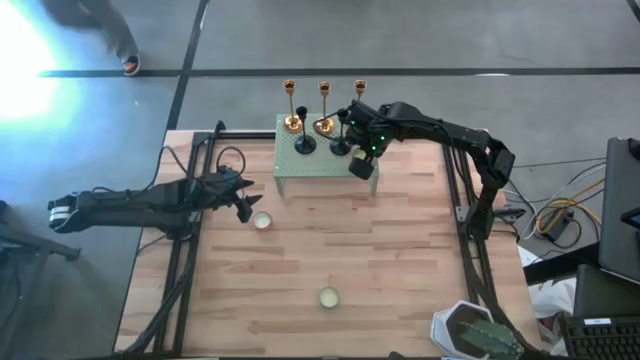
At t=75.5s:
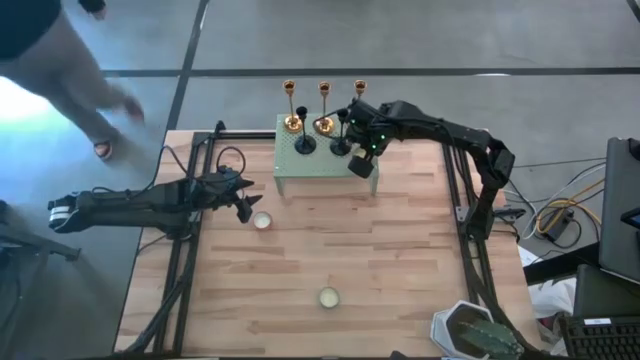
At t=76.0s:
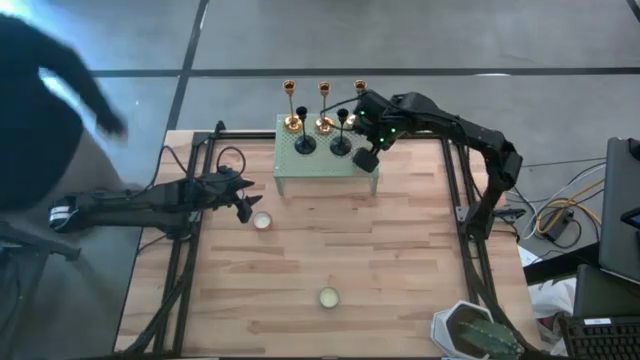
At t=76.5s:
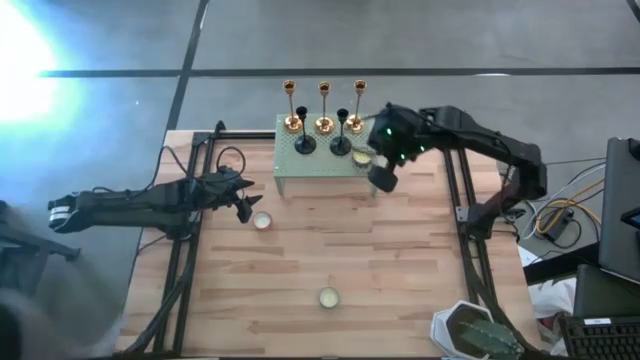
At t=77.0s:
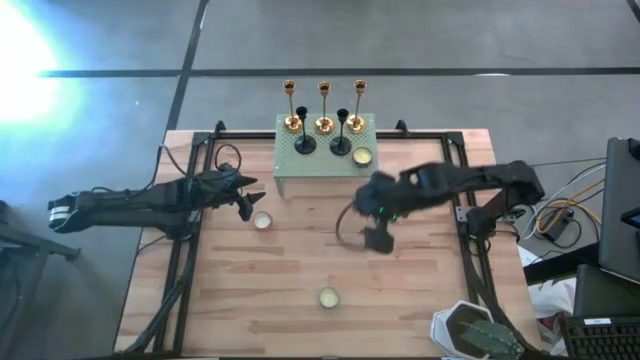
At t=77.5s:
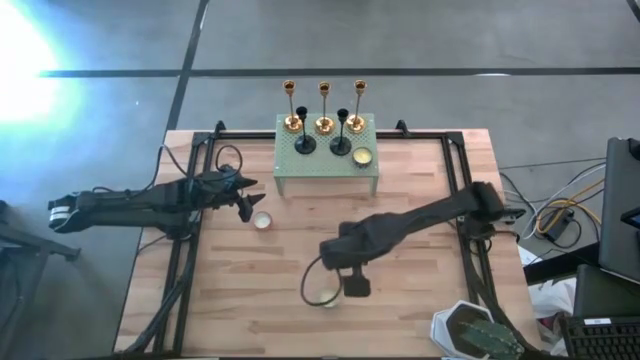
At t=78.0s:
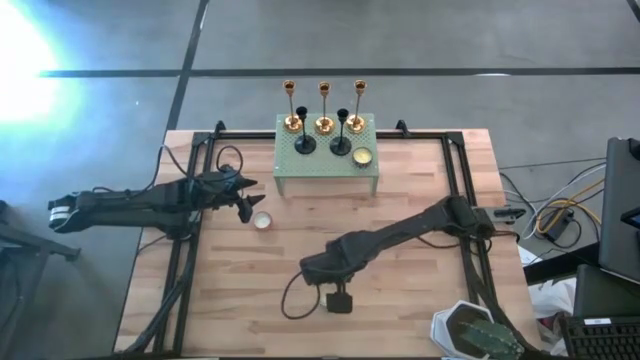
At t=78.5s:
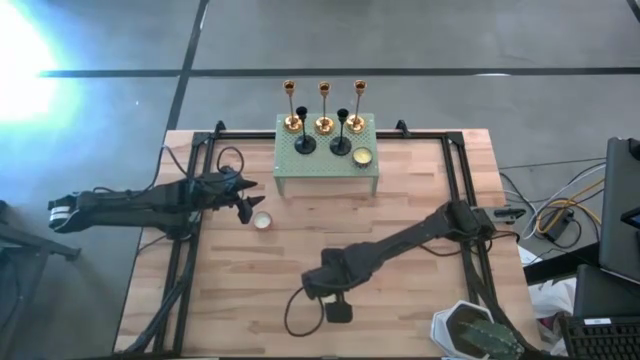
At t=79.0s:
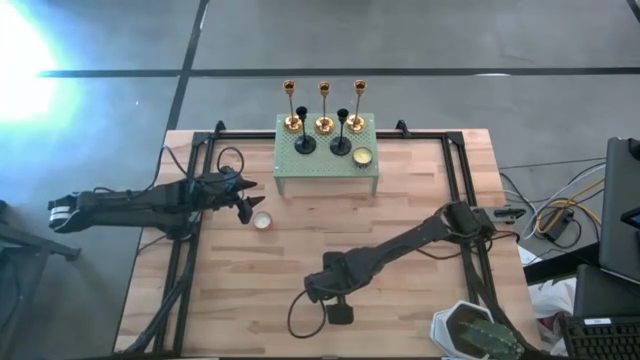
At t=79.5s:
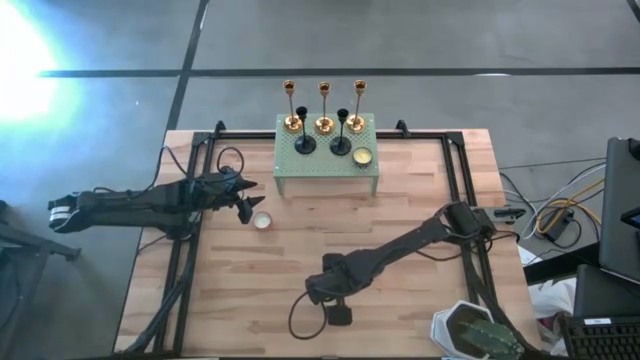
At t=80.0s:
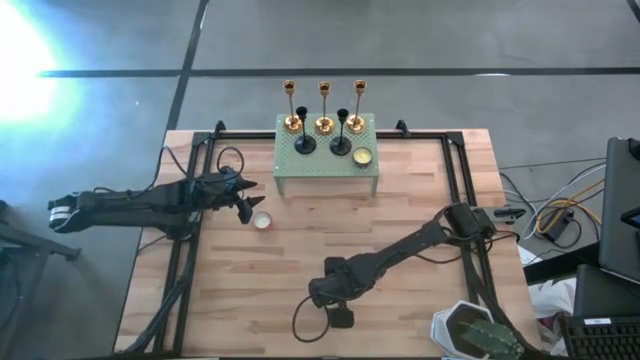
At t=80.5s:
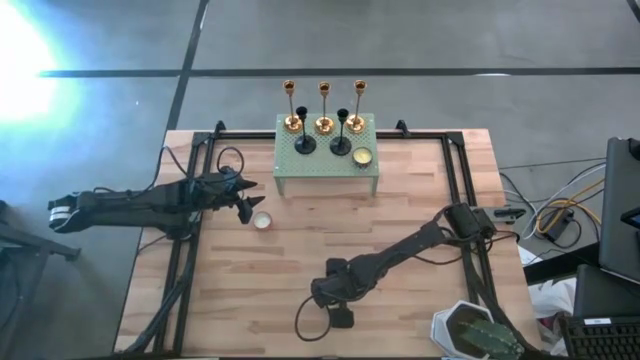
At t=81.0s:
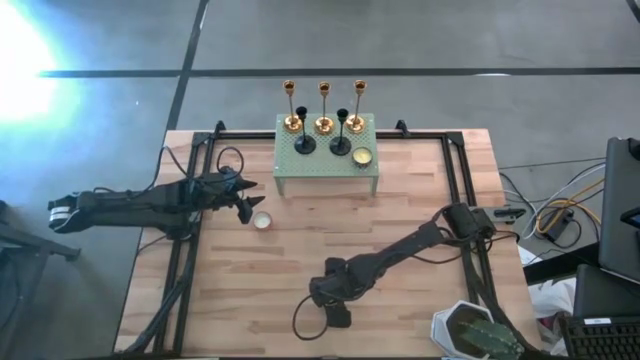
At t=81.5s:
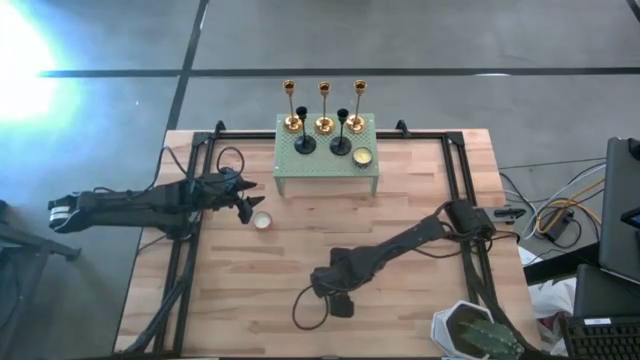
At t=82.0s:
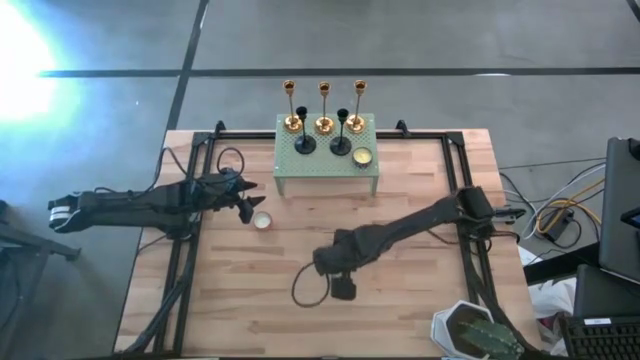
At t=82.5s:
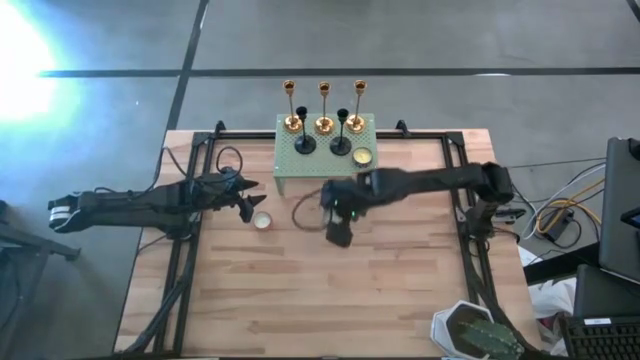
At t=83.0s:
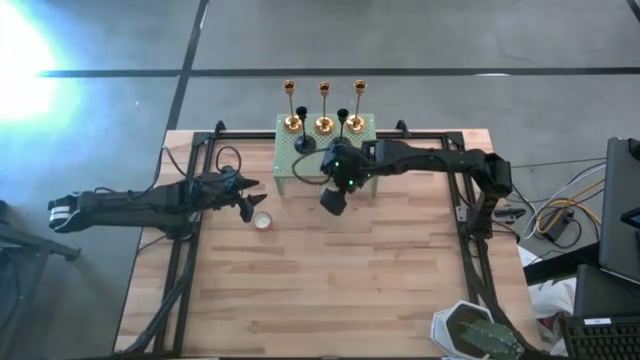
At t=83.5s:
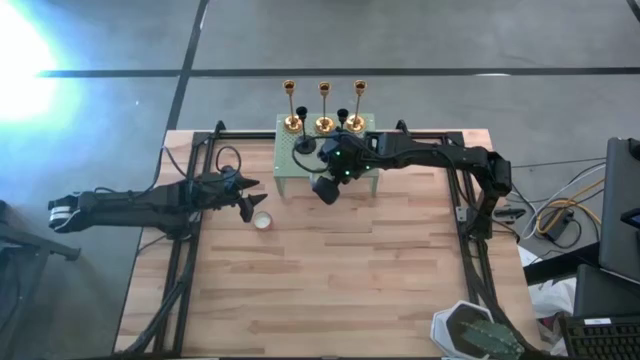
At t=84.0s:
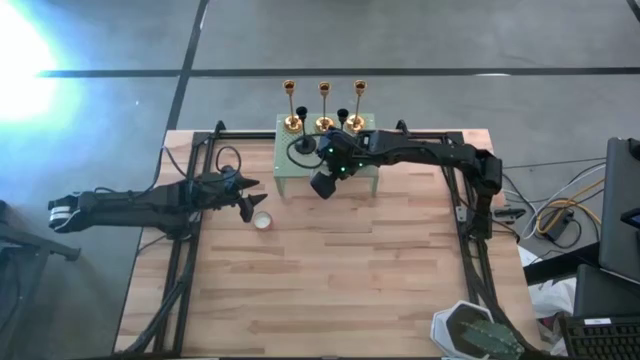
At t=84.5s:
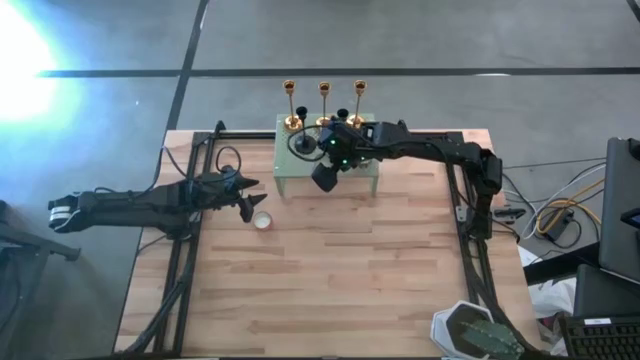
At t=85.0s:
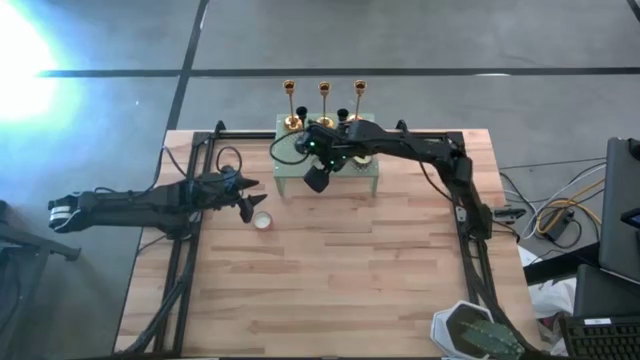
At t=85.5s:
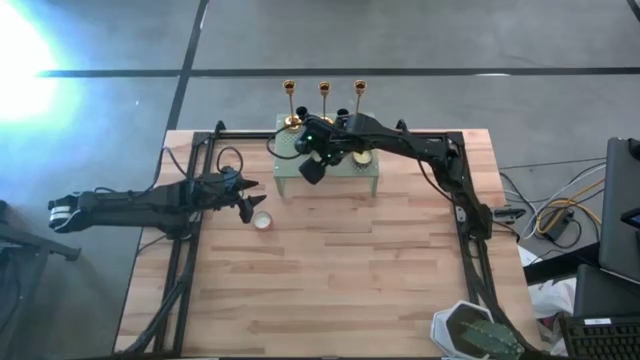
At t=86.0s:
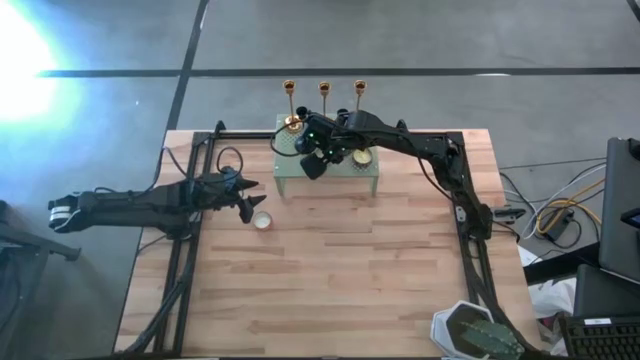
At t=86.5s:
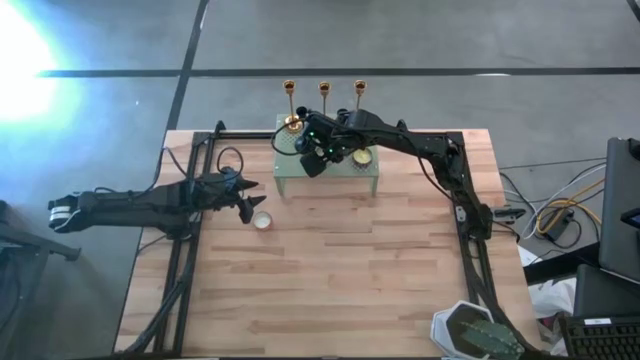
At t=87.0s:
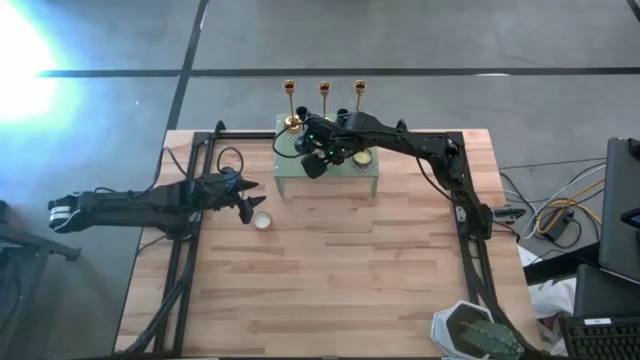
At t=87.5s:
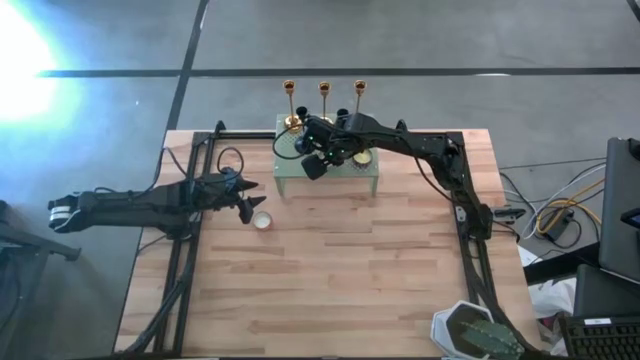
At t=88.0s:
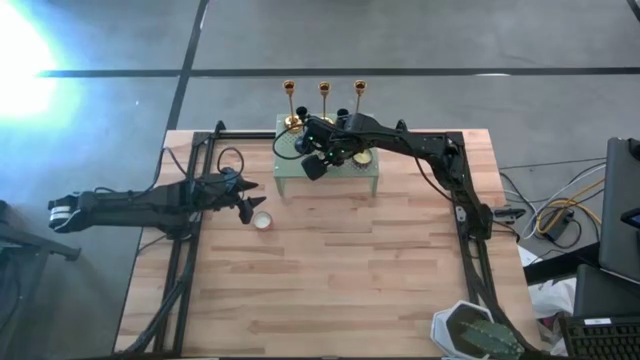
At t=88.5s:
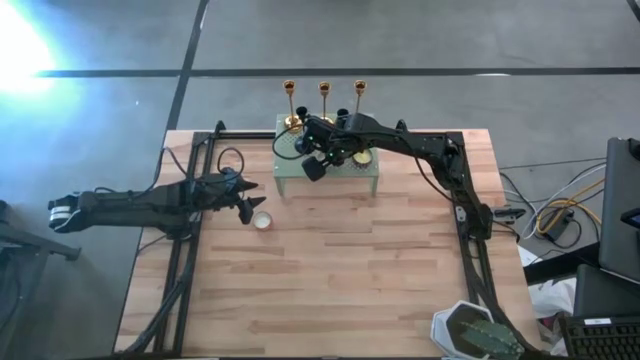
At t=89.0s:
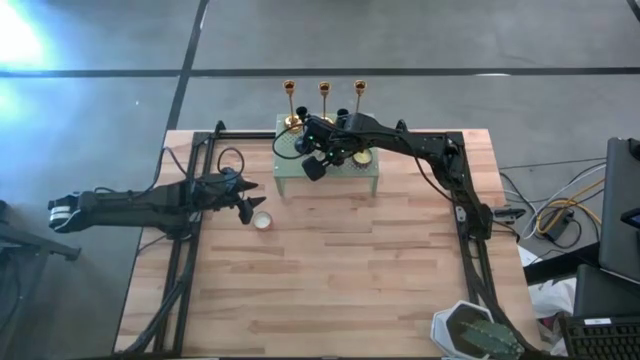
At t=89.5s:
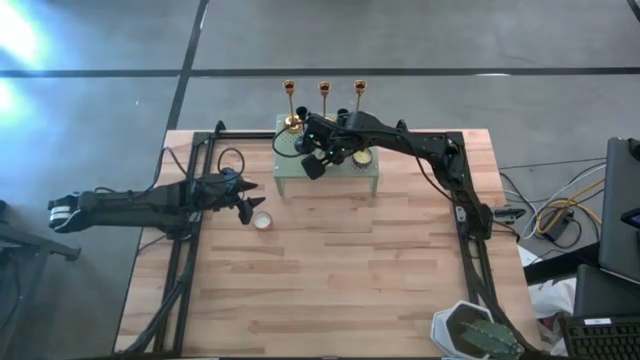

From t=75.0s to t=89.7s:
Task: Pick & Place candle stick holders
Put the white patterned scented candle on the shelf

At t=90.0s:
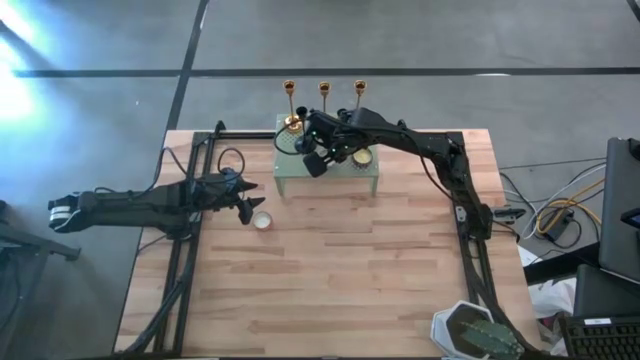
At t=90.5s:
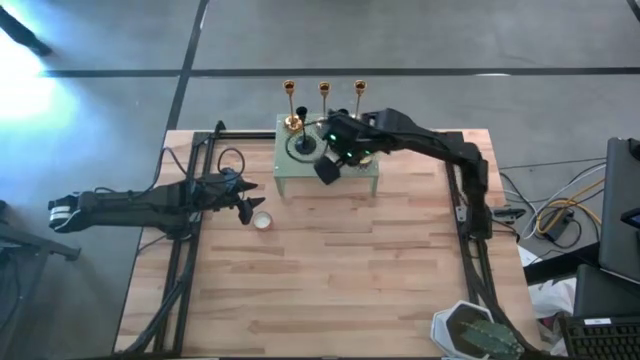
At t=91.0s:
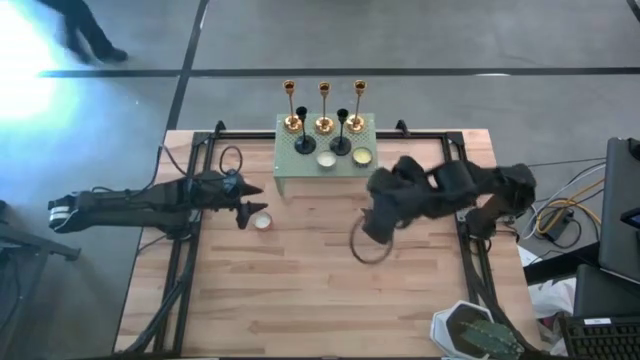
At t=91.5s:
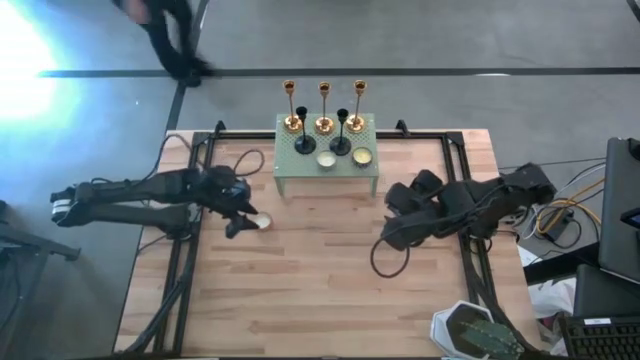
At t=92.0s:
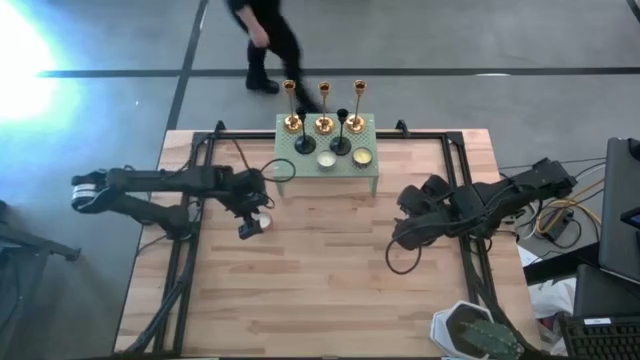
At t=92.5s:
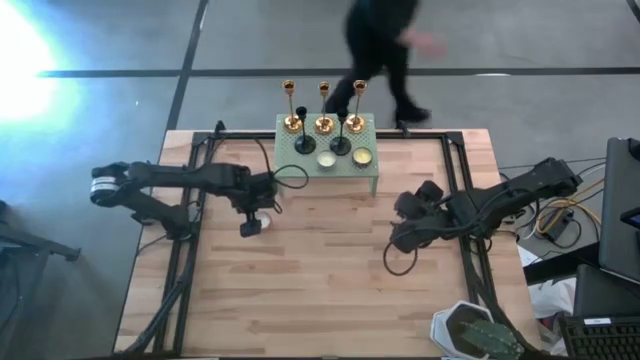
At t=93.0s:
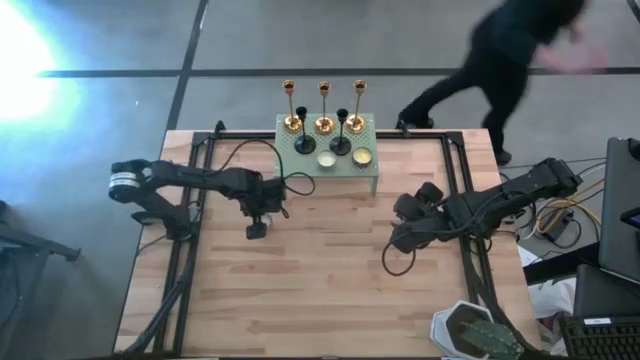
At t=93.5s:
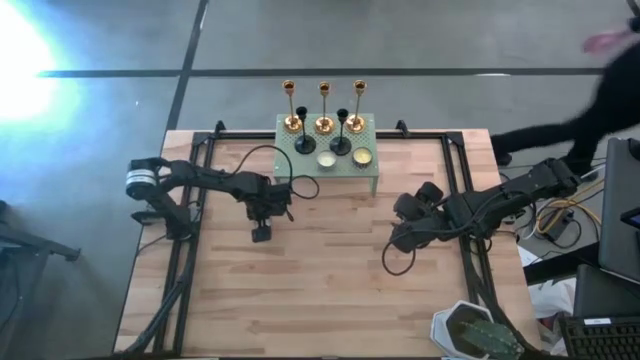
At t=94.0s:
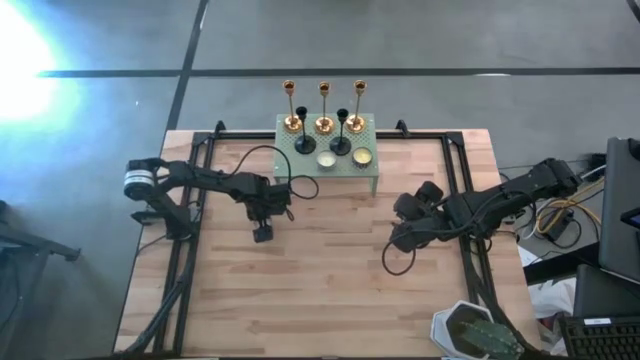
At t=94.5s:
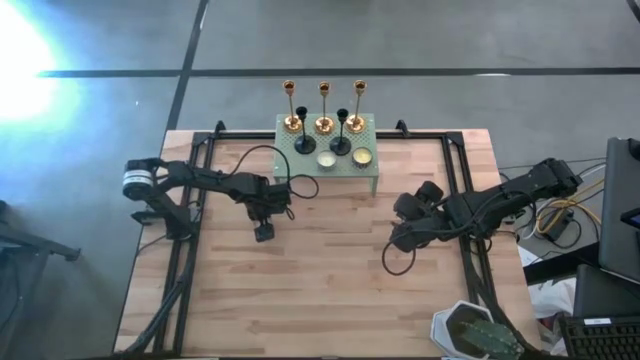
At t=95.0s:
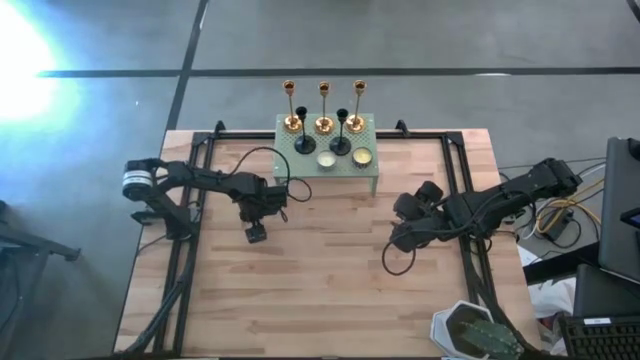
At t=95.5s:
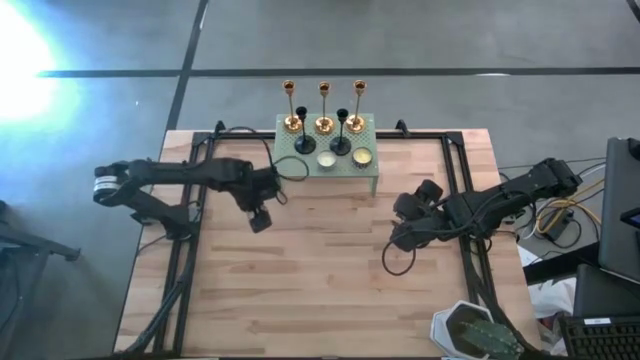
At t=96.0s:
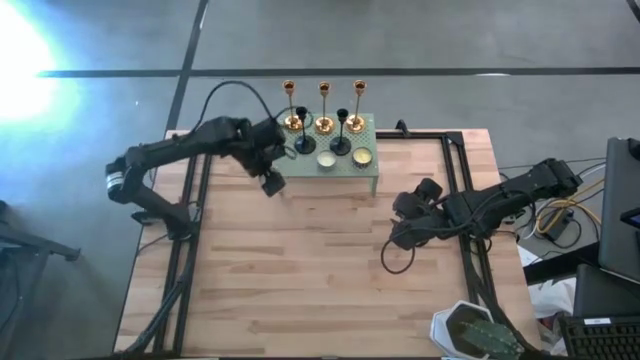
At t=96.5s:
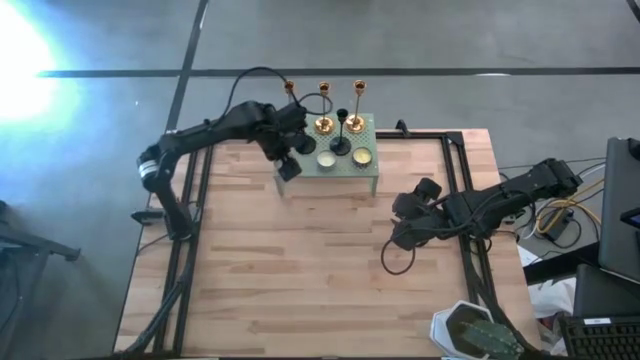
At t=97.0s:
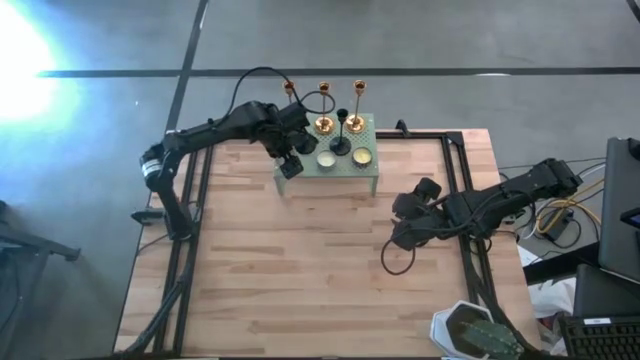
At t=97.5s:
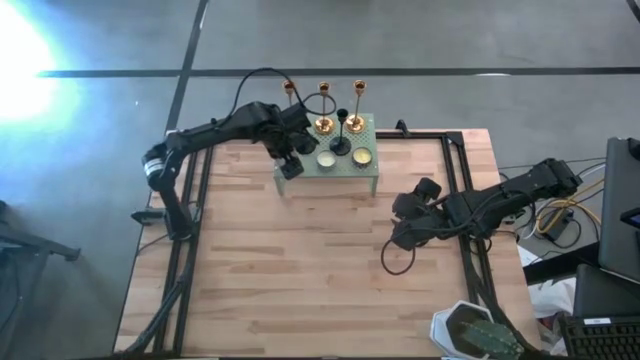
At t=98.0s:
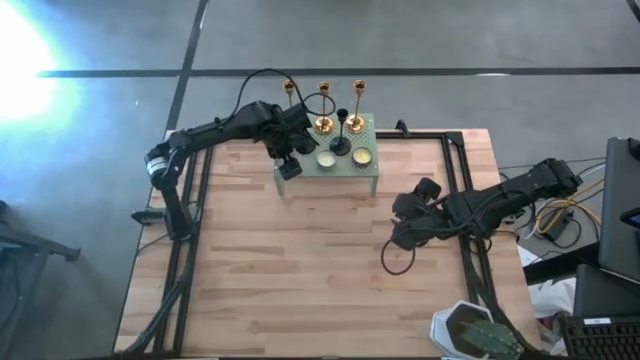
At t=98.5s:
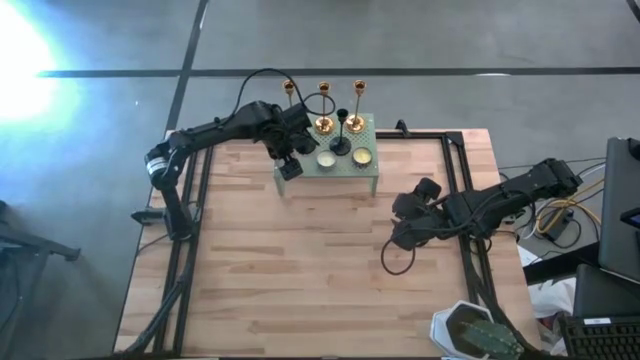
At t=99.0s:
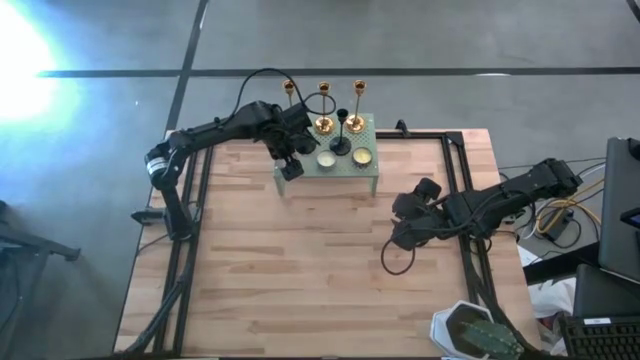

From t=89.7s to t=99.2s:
Put the orange patterned scented candle on the shelf
